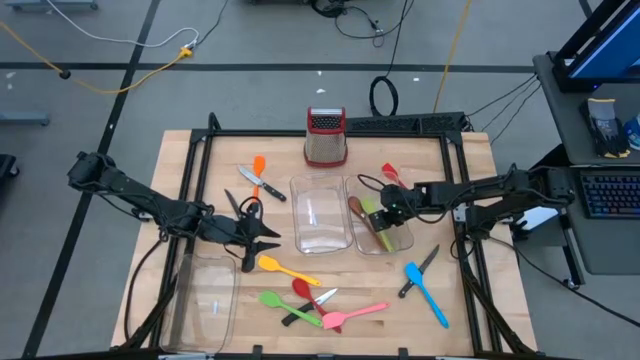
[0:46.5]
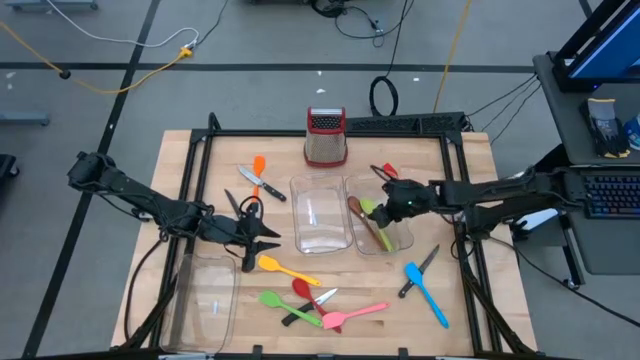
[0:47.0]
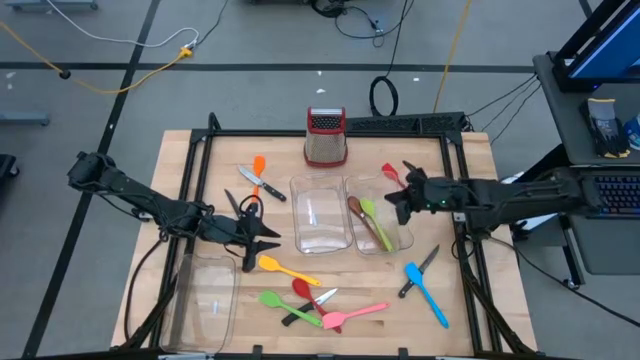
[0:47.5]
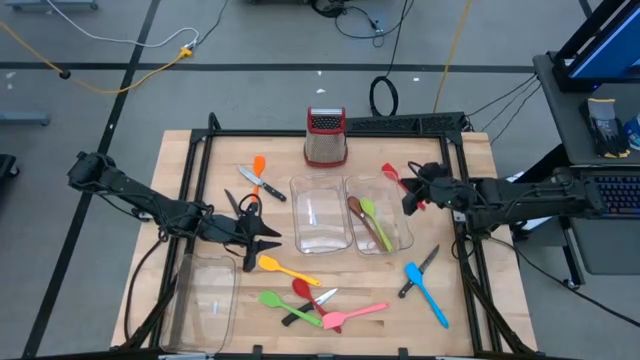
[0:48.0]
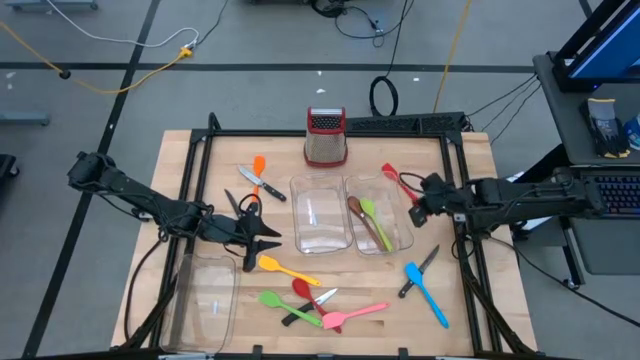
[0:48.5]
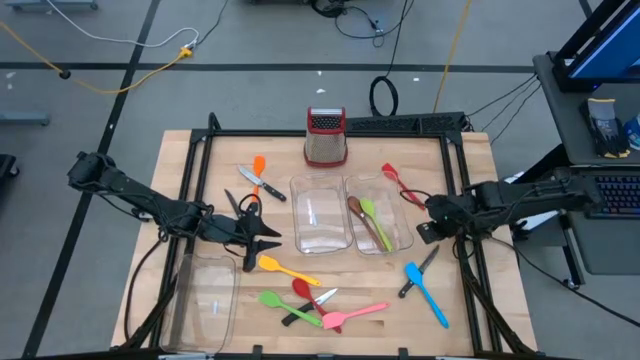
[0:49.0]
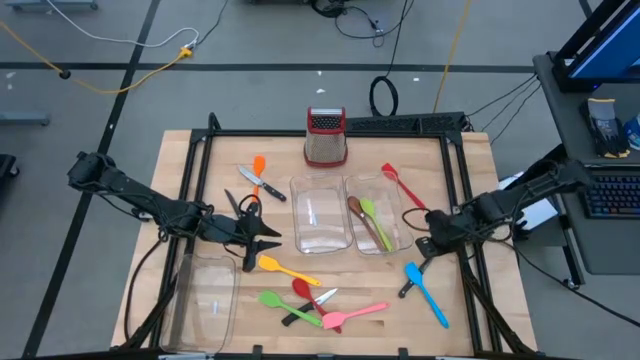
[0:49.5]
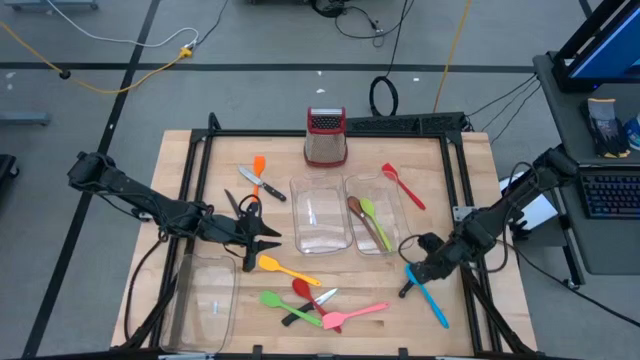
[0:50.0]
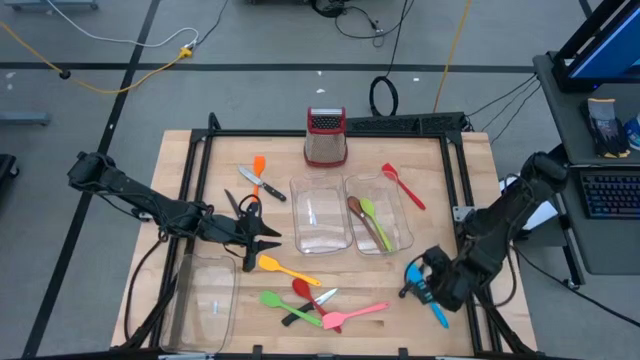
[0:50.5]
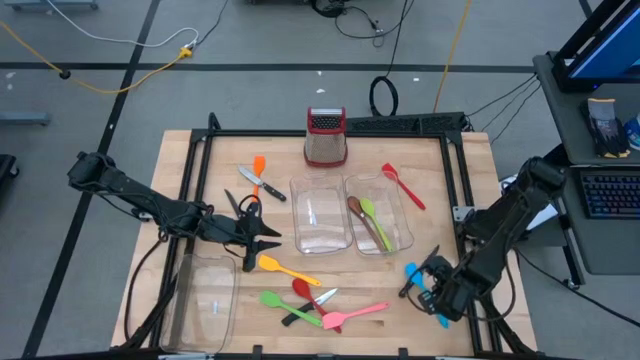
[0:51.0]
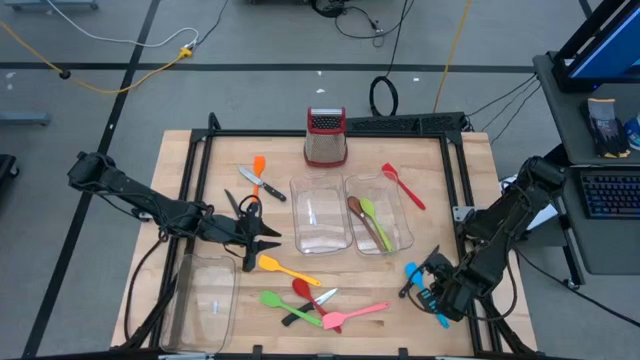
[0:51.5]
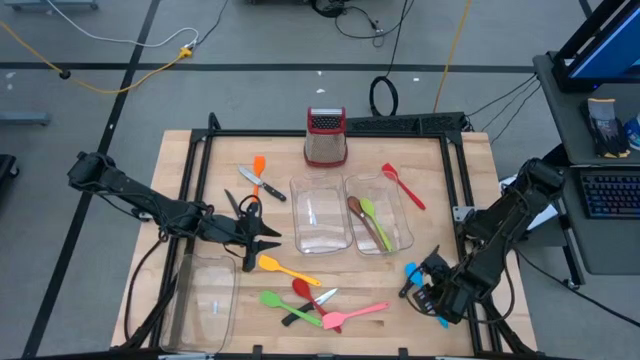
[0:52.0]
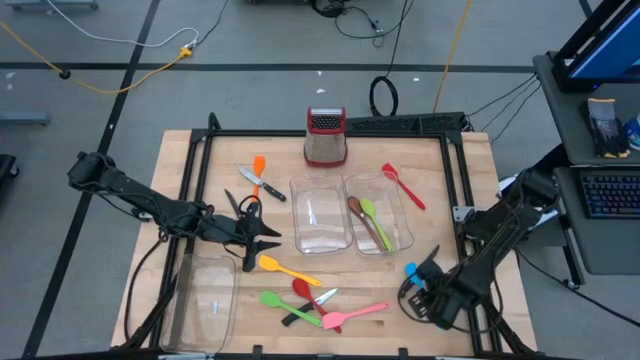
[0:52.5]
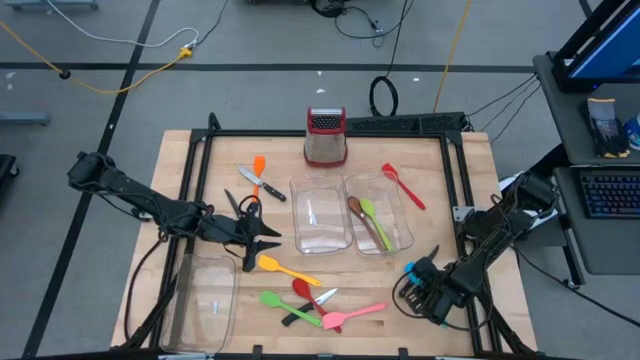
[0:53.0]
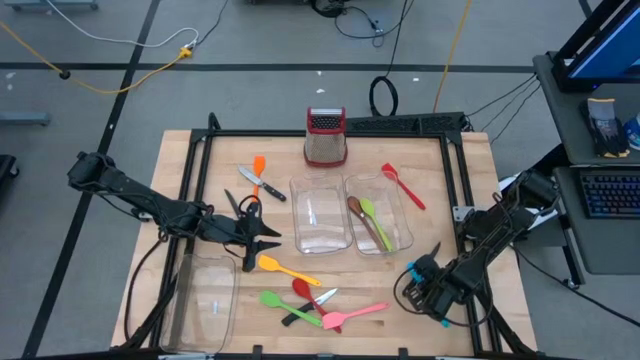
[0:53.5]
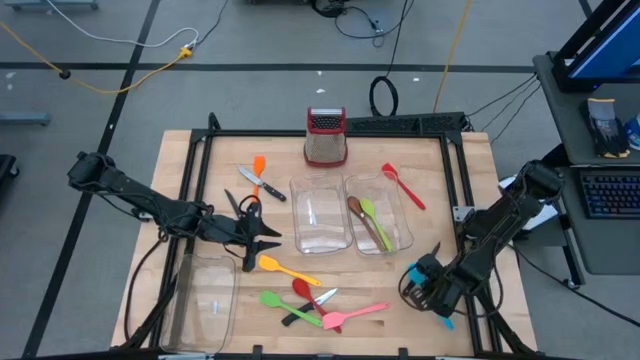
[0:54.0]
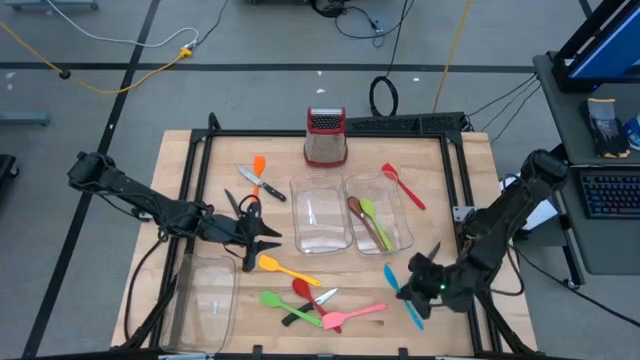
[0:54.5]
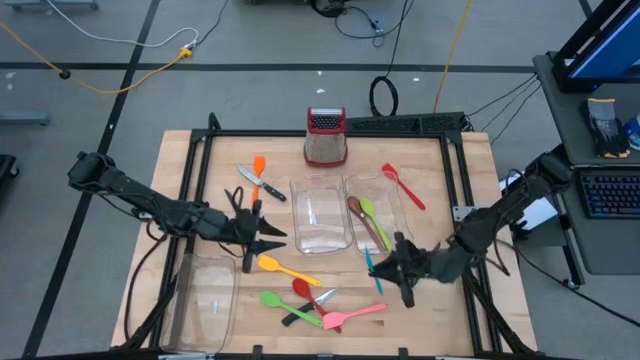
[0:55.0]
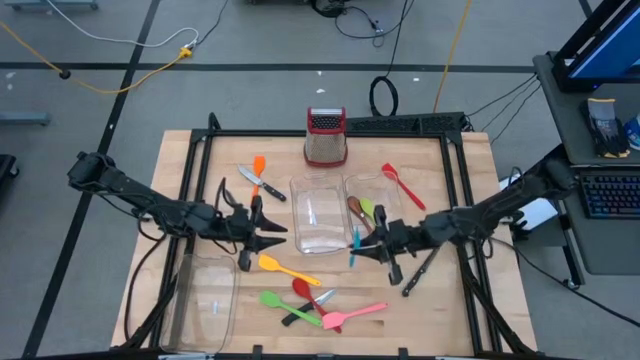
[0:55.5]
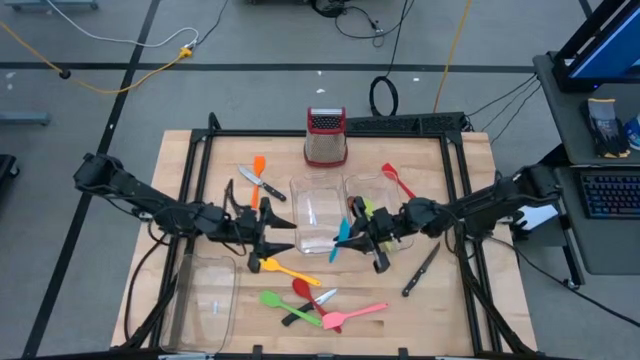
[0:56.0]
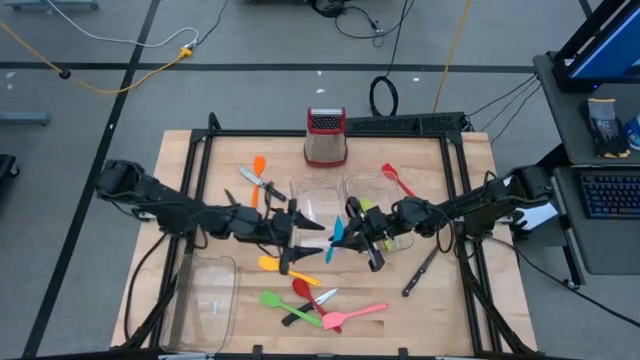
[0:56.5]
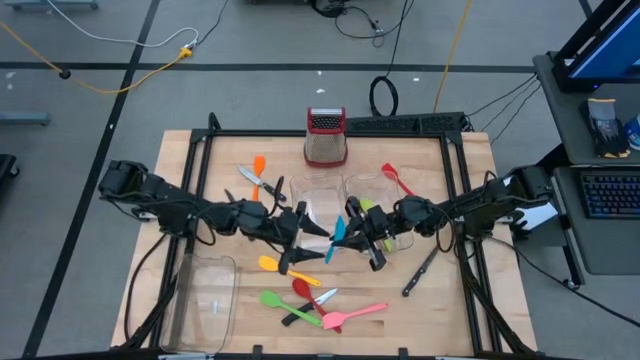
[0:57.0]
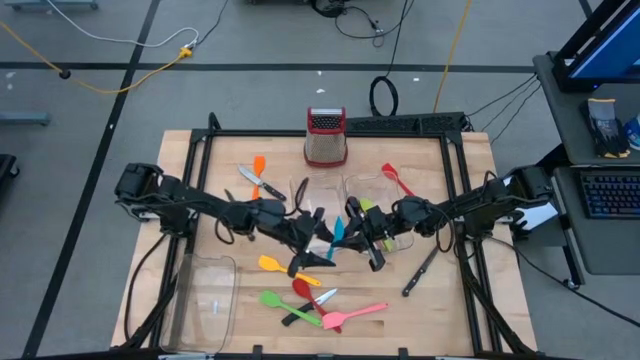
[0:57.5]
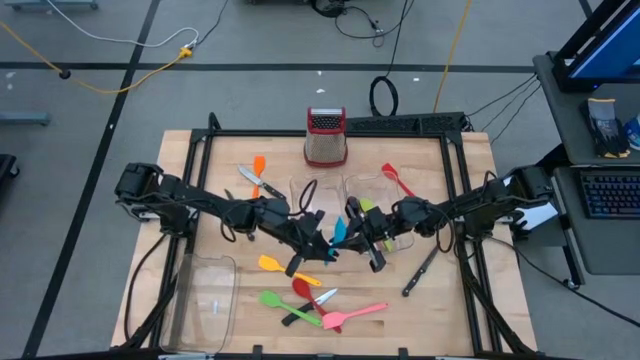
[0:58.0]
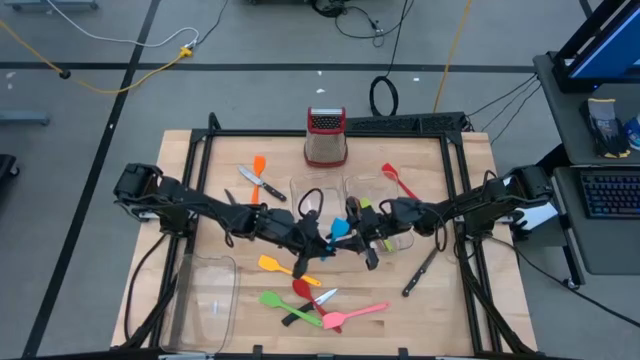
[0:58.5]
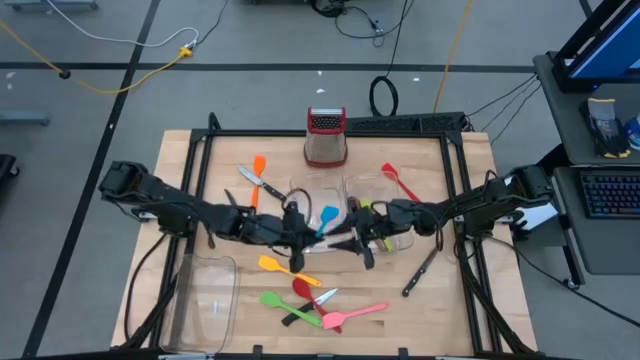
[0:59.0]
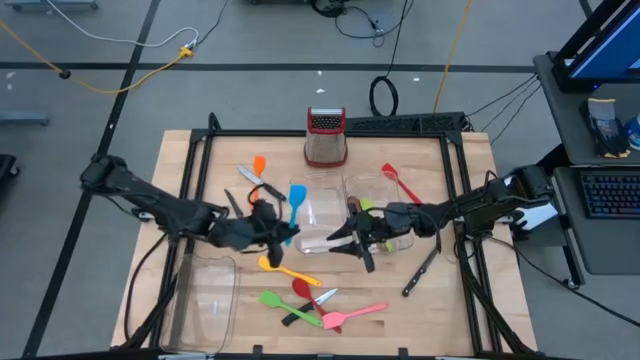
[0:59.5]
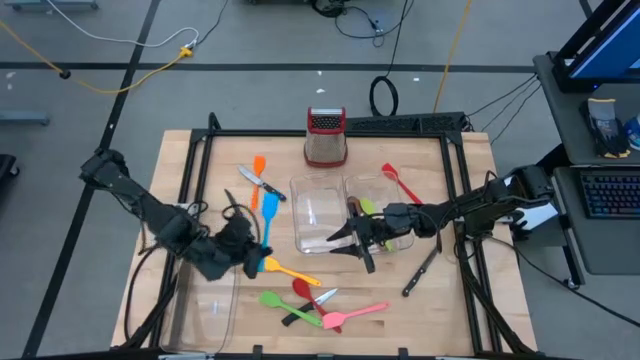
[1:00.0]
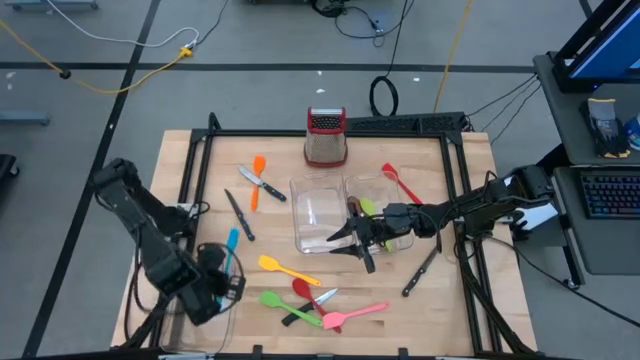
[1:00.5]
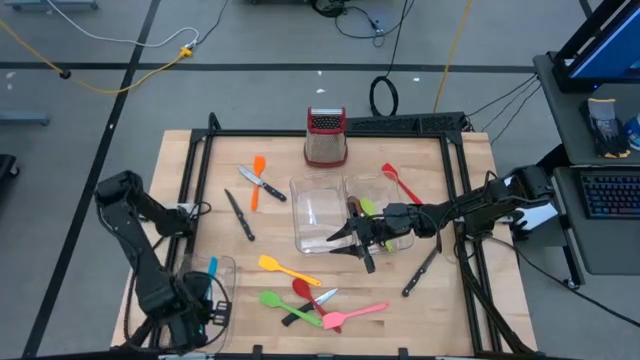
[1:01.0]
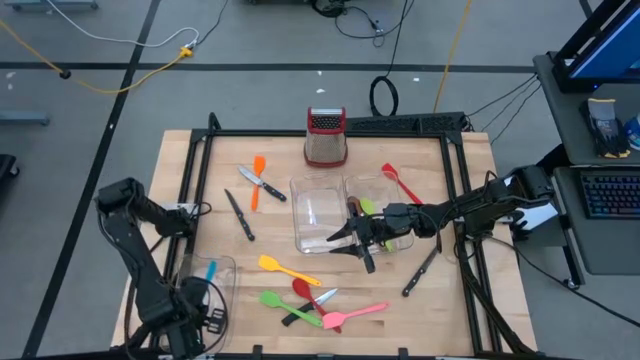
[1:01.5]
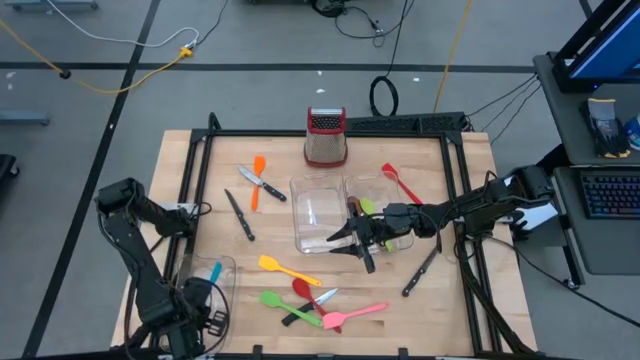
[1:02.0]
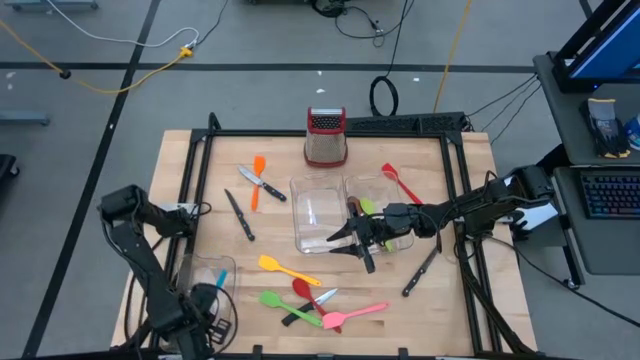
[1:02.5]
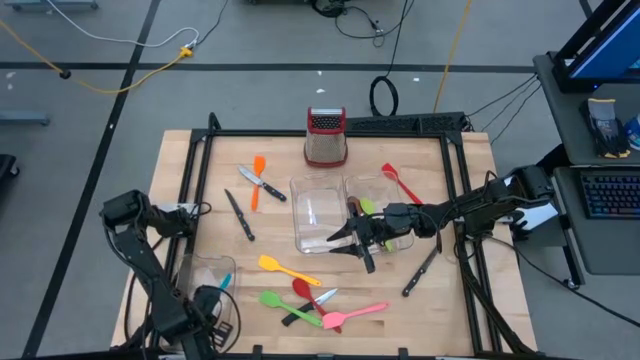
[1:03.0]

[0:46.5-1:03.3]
Task: Pick & Place Kitchen Items
Put the blue spatula into the left transparent bin

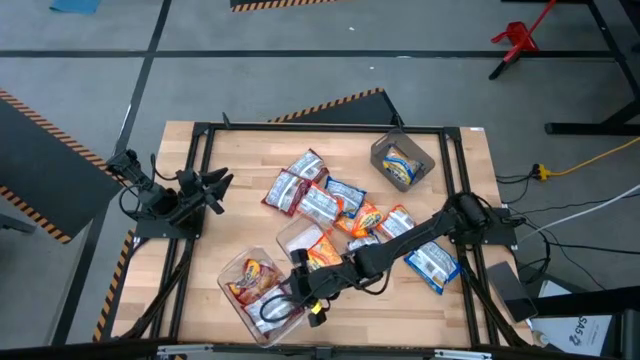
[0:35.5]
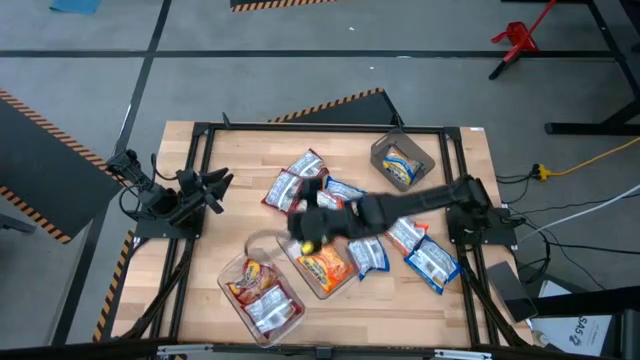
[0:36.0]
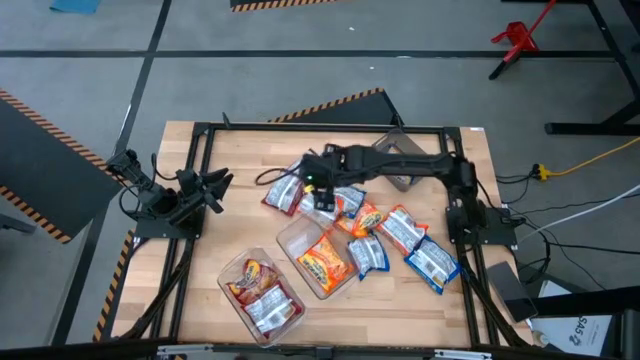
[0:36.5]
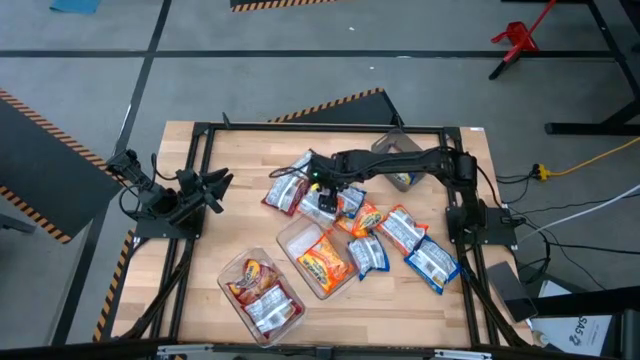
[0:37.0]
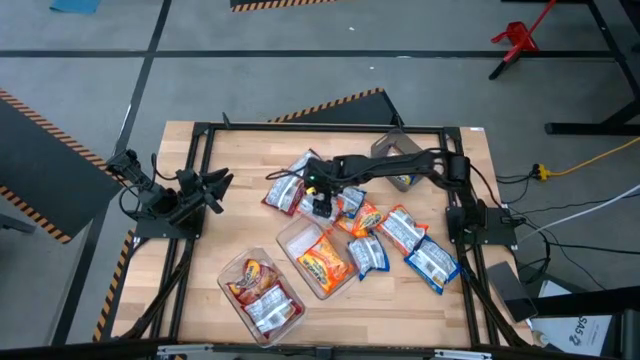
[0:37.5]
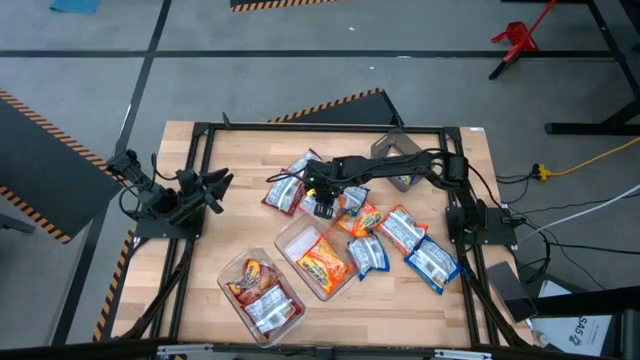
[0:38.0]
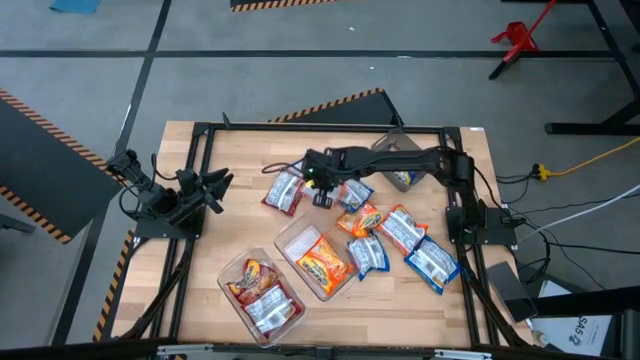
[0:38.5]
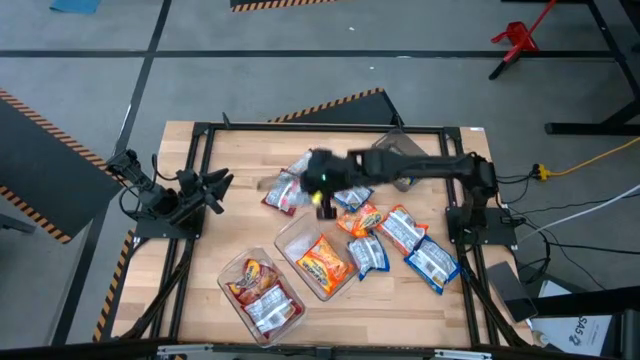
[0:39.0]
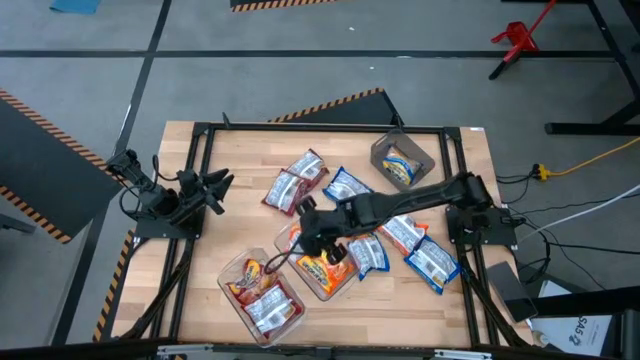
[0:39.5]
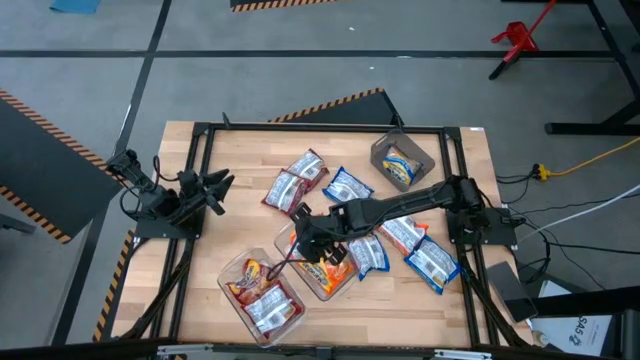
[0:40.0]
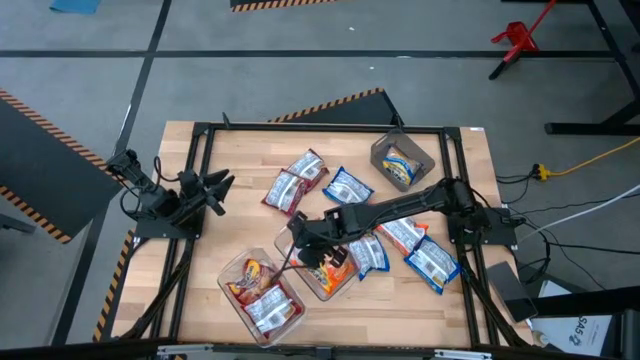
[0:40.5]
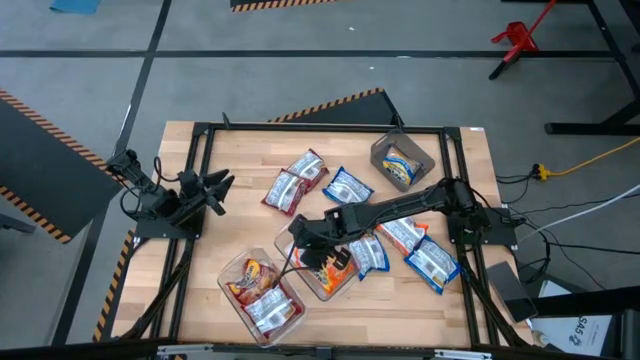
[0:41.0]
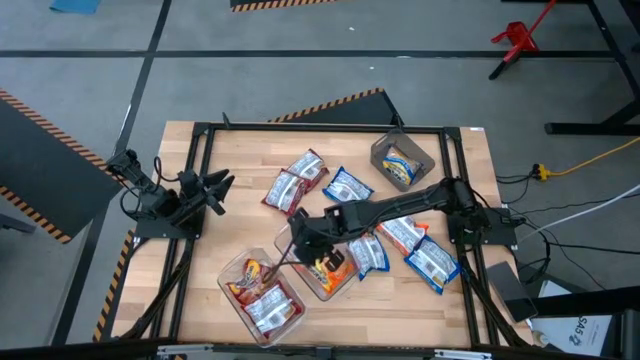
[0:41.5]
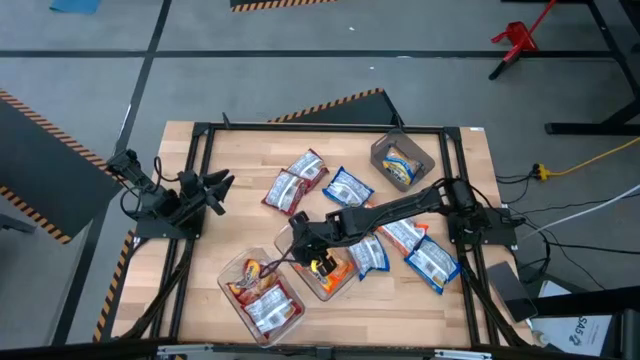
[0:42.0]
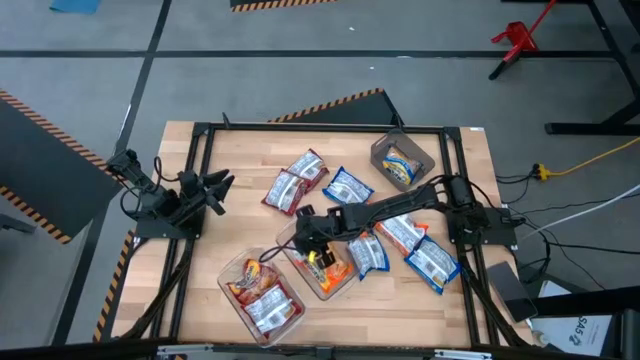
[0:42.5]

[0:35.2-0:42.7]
Task: Sort Maruchan noodles
Put the orange noodle pack into the top transparent bin
